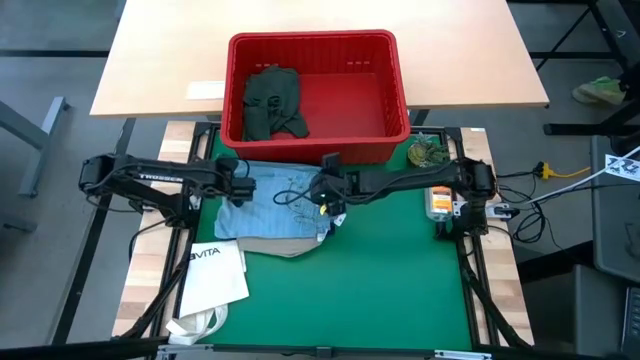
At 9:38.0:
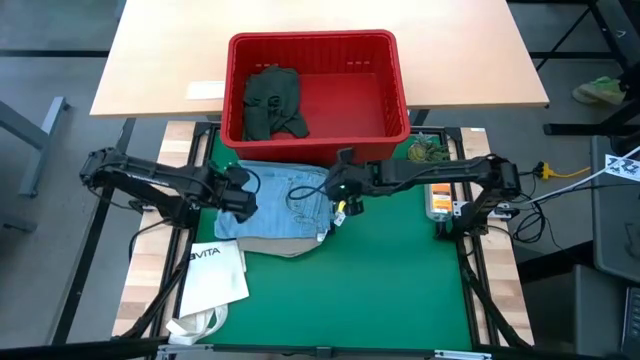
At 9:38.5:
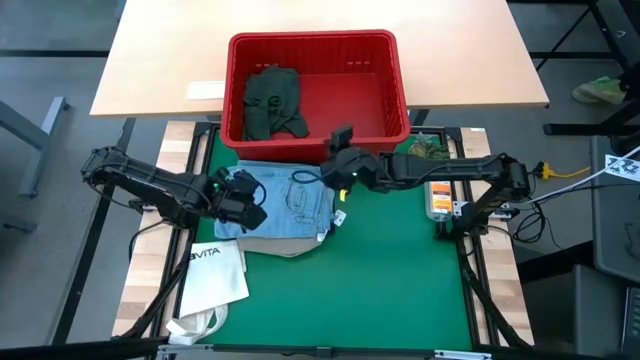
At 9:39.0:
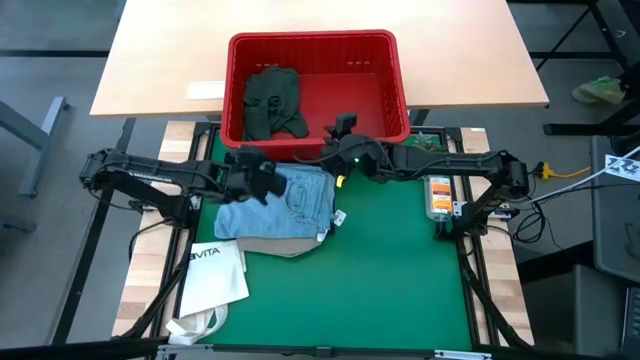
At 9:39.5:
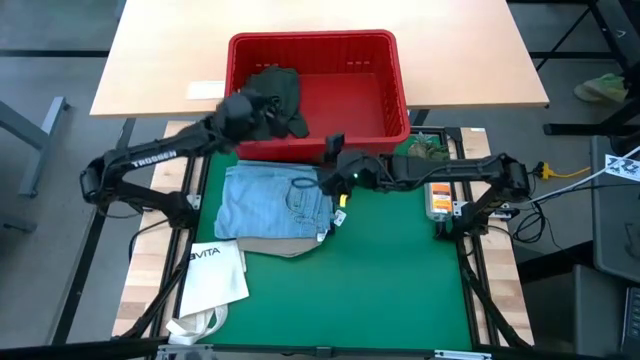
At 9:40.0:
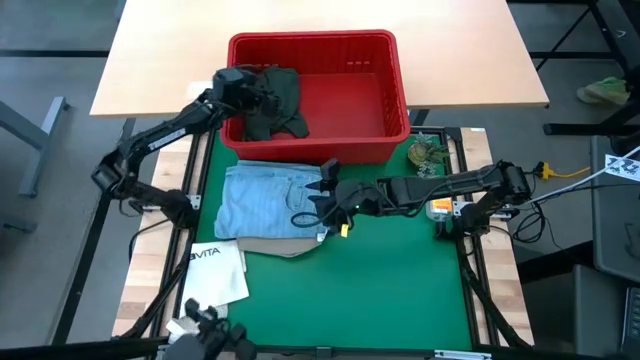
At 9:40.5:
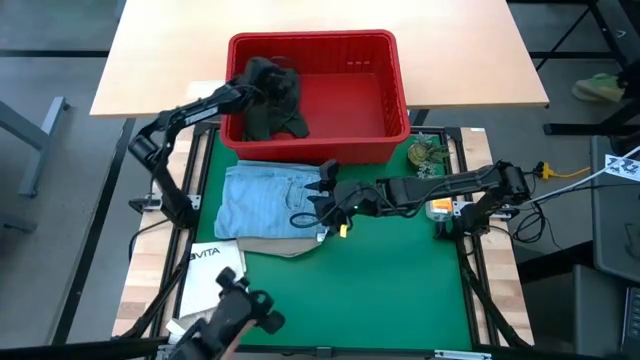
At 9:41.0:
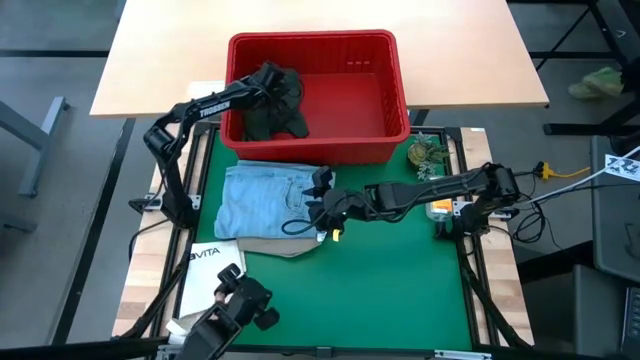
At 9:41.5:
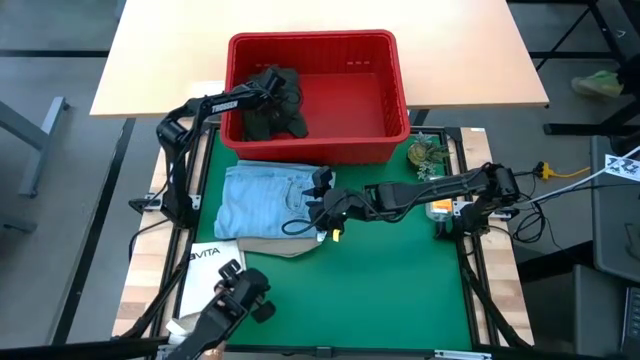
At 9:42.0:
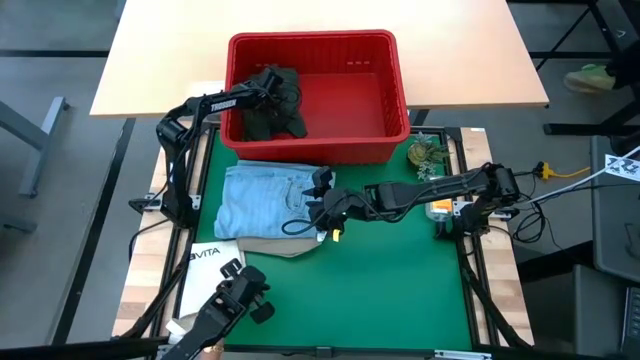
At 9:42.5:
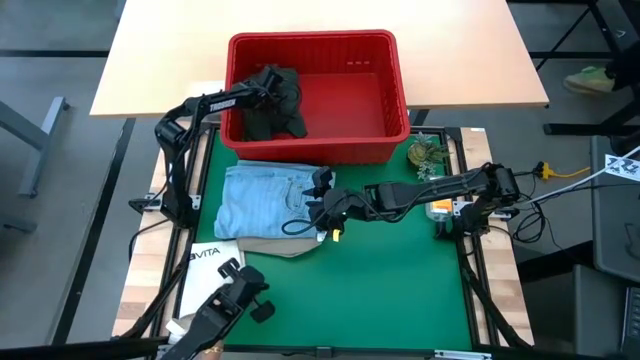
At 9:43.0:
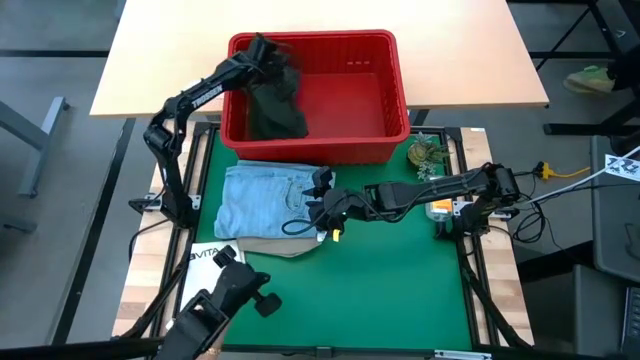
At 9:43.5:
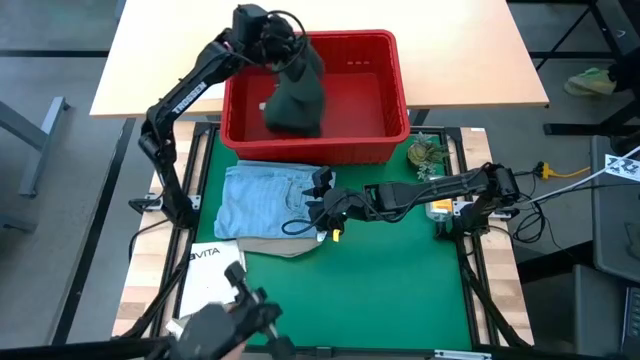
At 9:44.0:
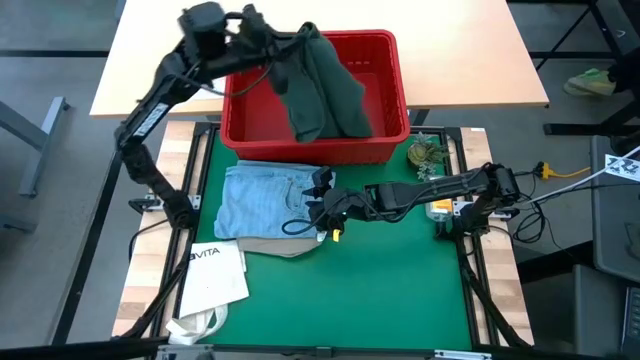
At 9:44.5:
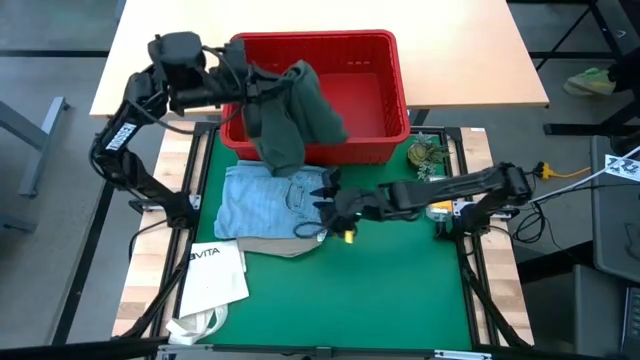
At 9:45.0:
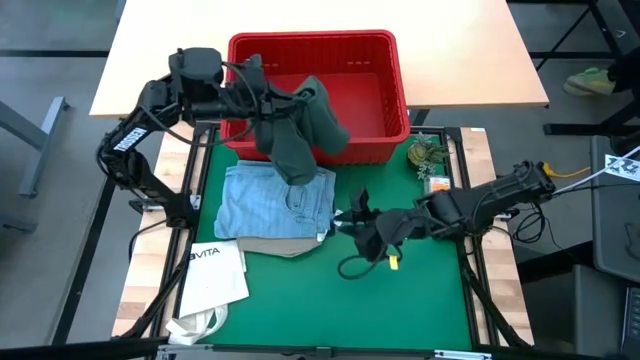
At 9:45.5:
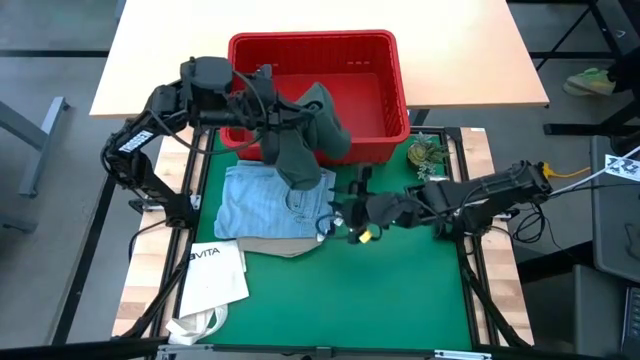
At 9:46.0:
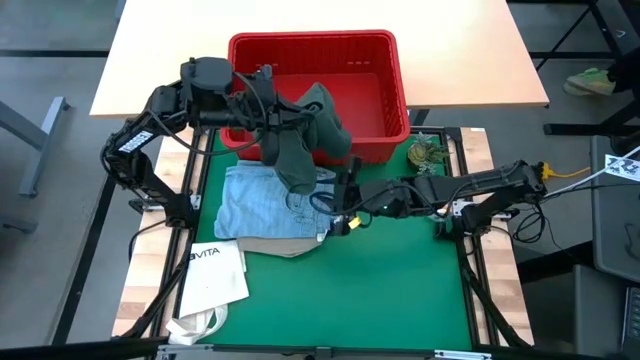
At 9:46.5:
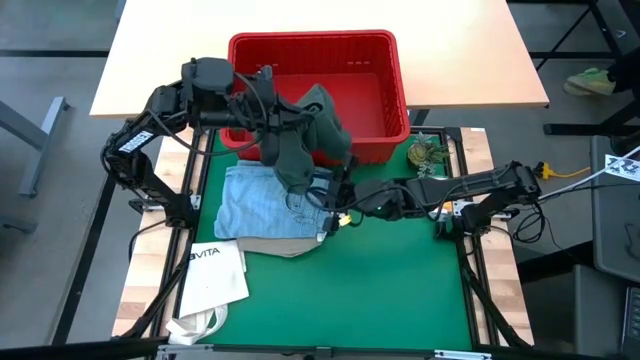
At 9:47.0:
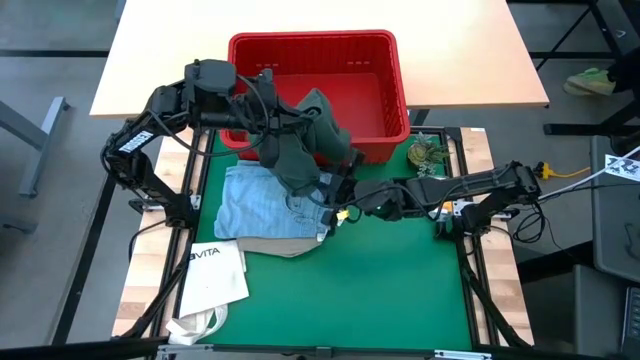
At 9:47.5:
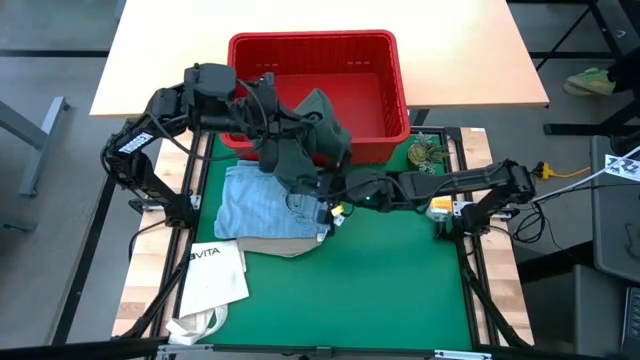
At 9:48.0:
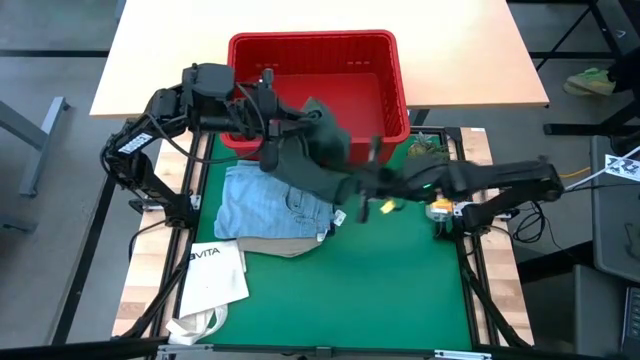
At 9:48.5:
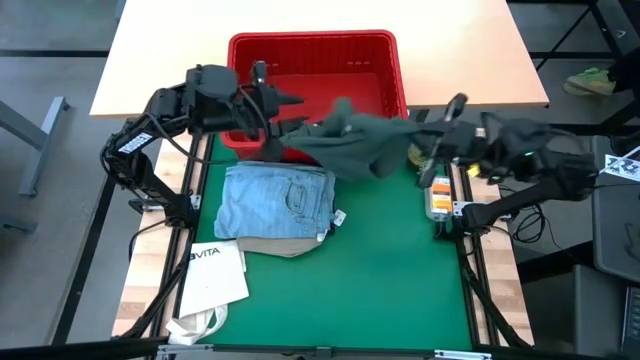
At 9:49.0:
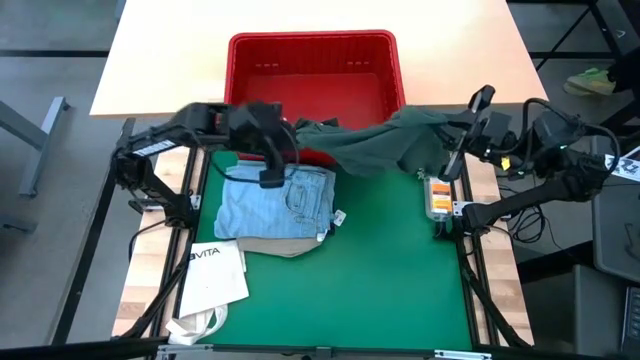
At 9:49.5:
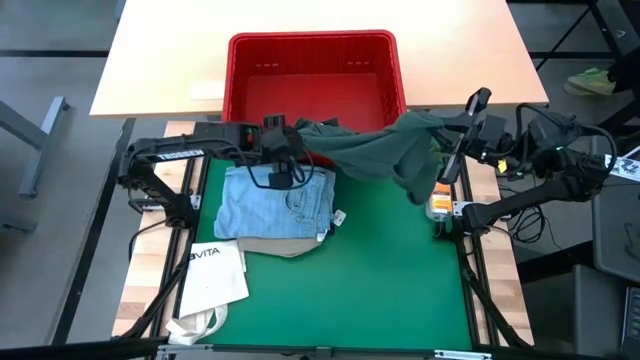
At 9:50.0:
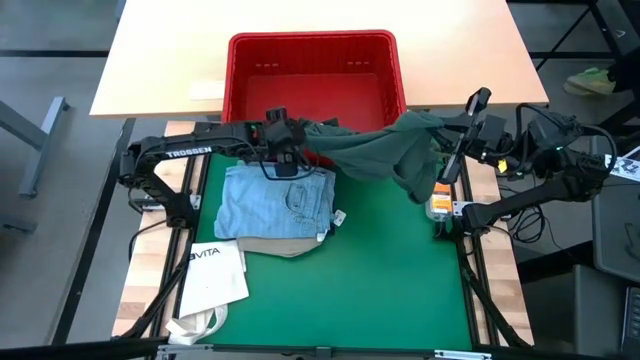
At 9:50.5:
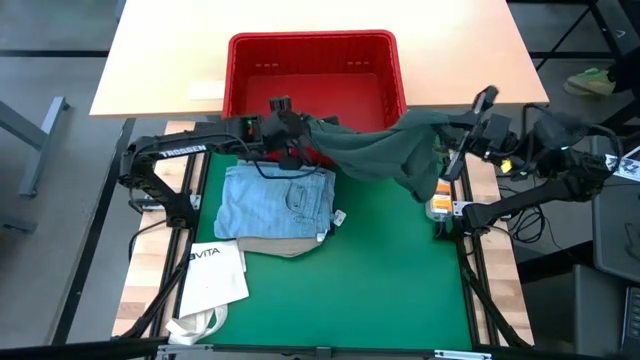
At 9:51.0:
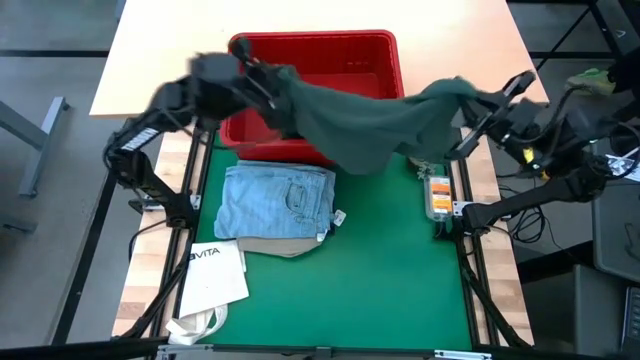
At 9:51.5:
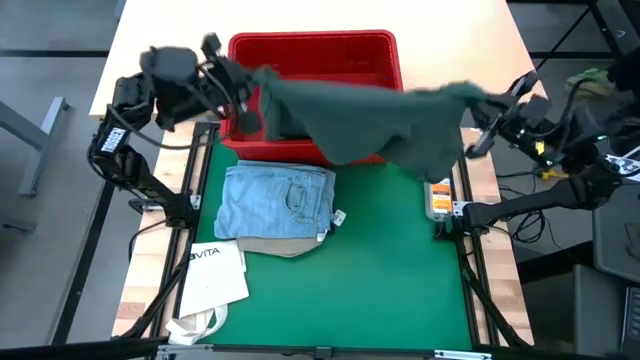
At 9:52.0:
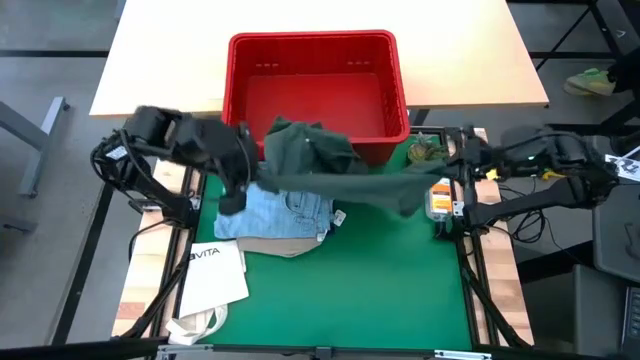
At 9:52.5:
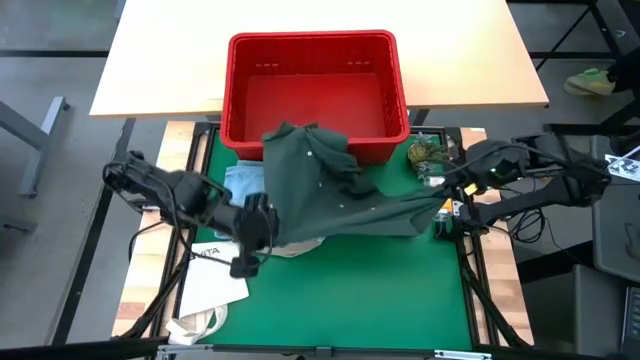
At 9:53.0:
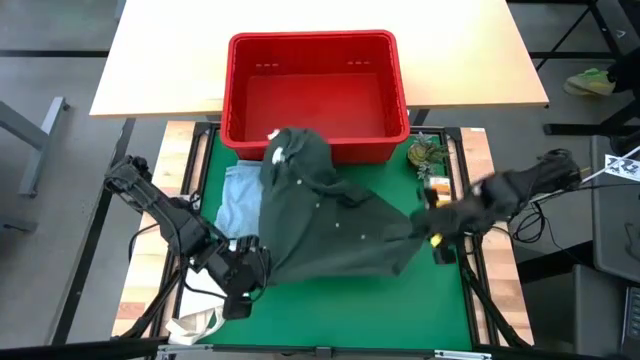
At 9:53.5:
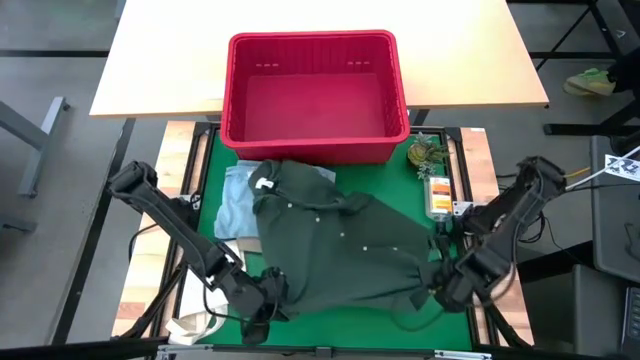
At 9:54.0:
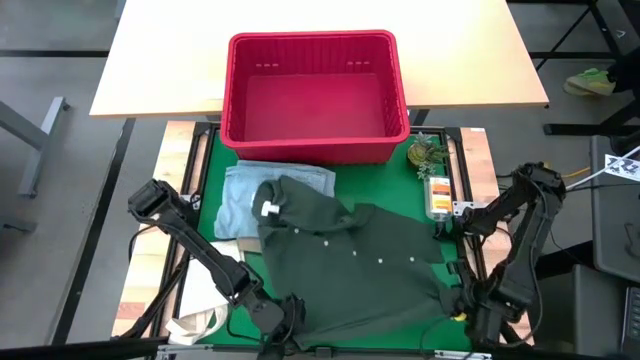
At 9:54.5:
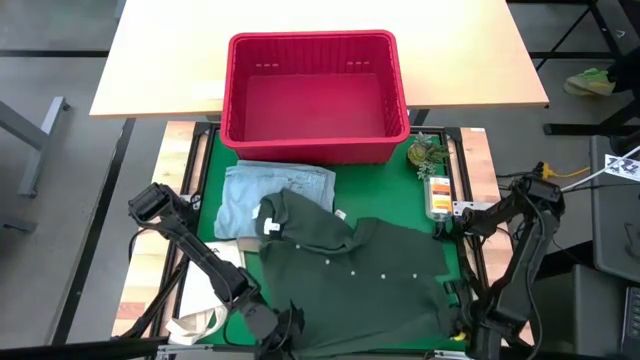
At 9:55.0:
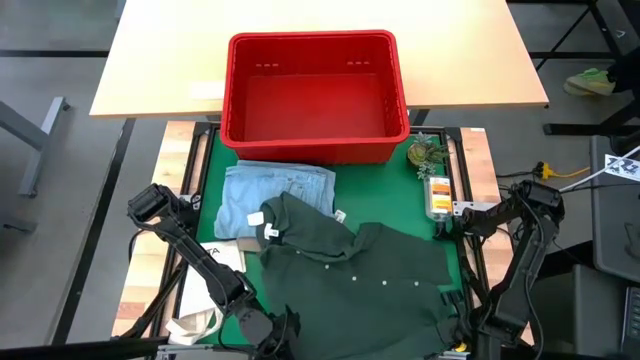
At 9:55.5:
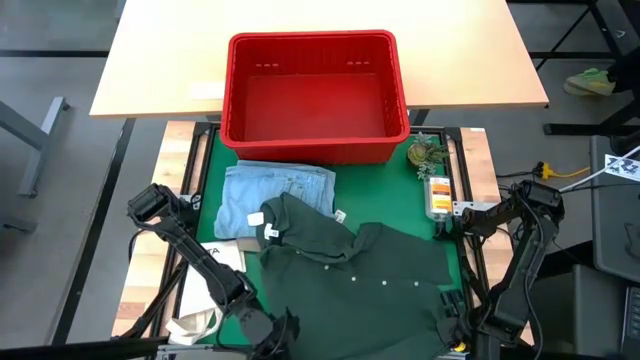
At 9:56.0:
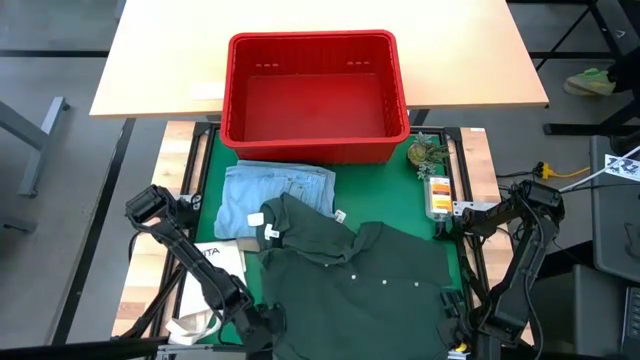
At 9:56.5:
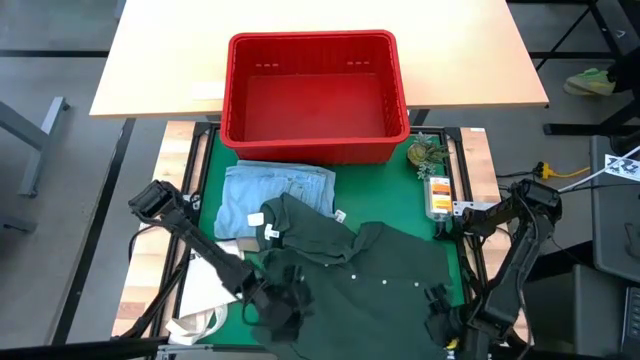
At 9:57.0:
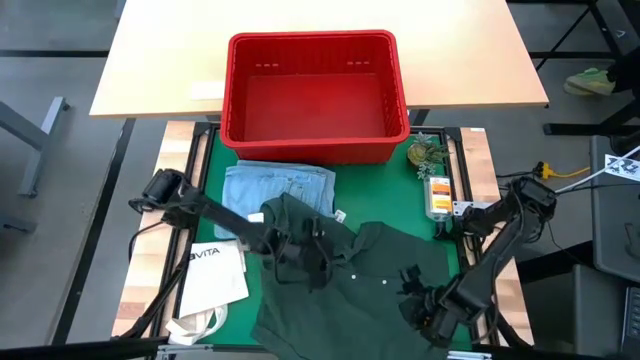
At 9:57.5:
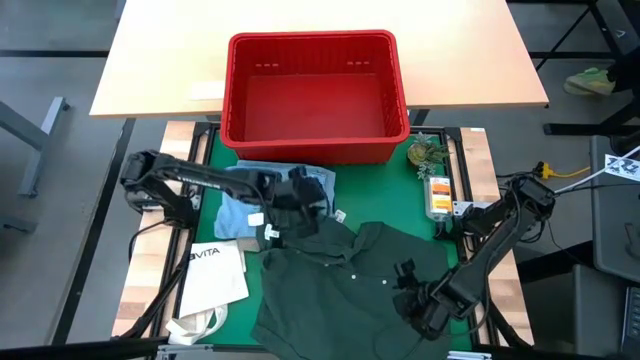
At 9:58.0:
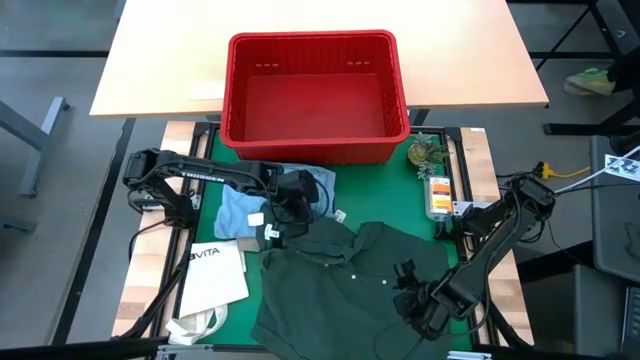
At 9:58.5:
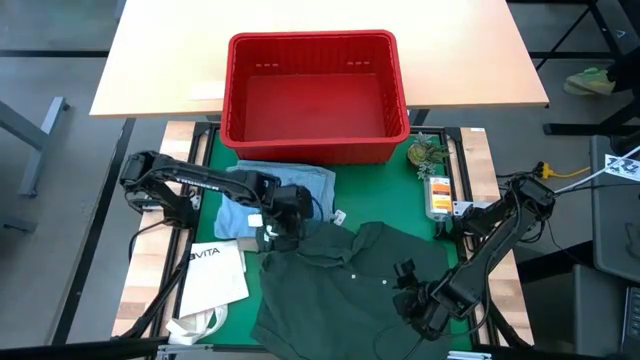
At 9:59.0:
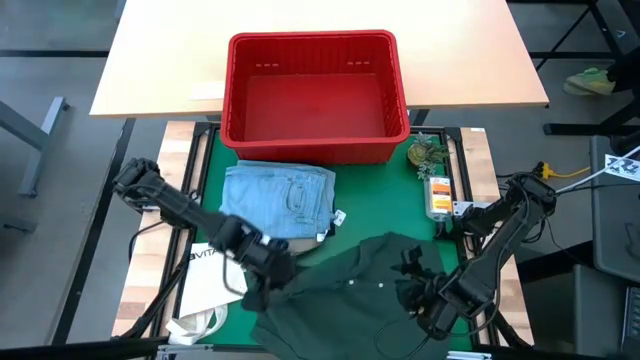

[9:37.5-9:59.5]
Task: Fold Laundry from Bin
Fold the green polo shirt
